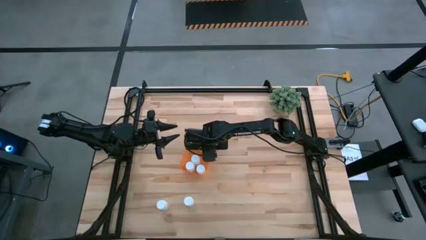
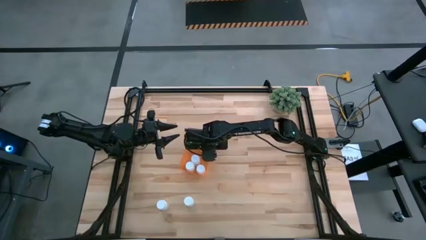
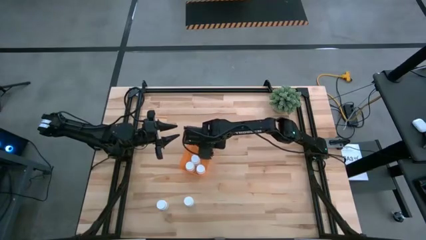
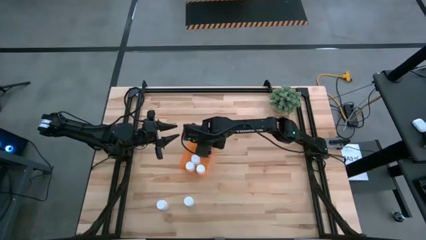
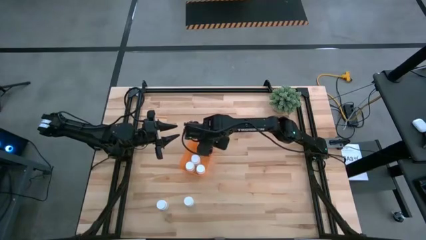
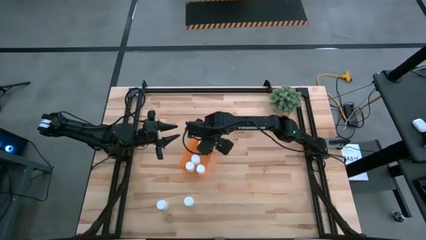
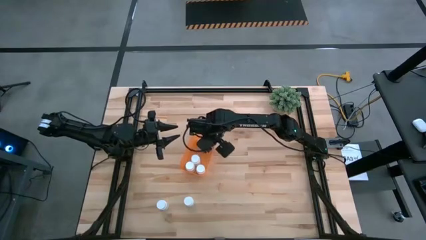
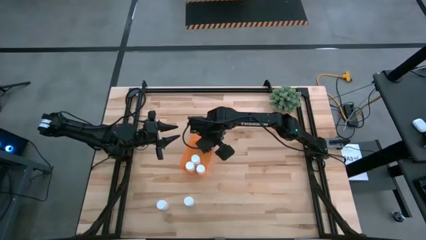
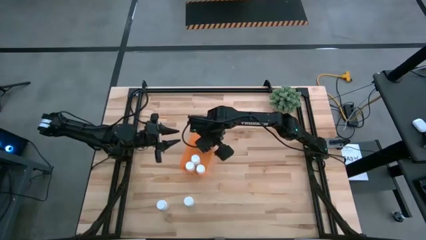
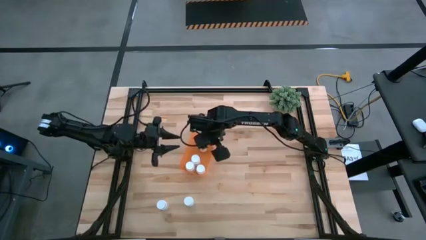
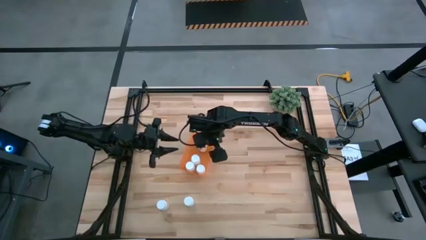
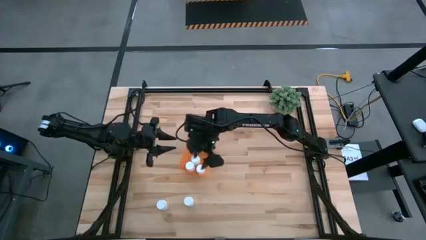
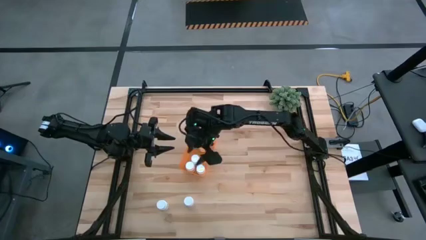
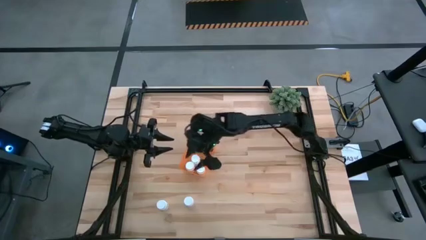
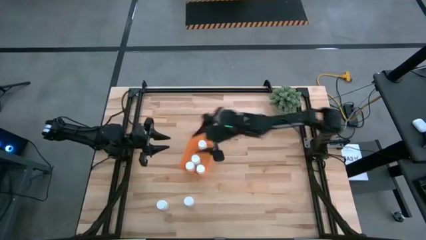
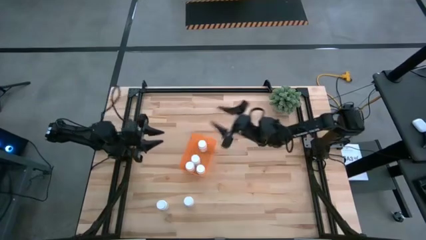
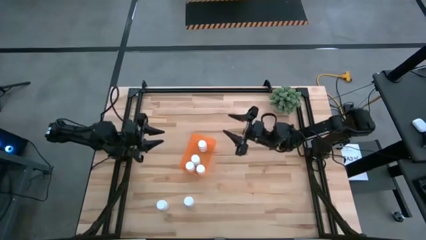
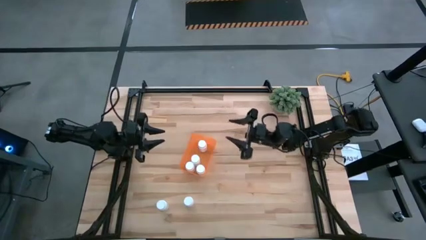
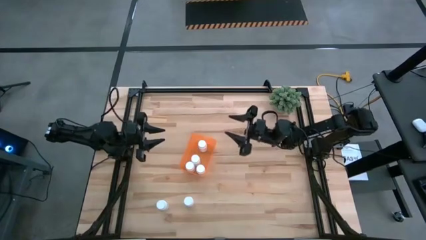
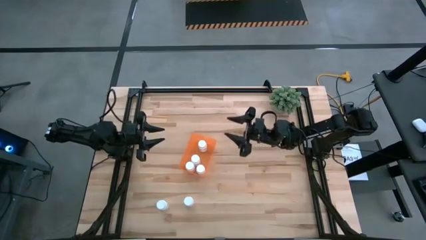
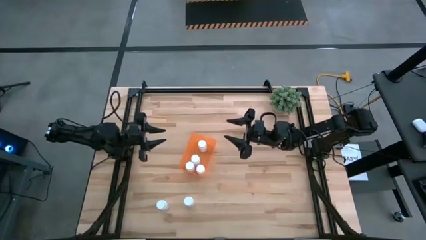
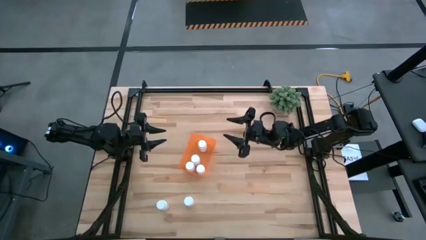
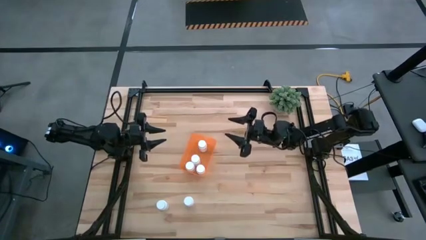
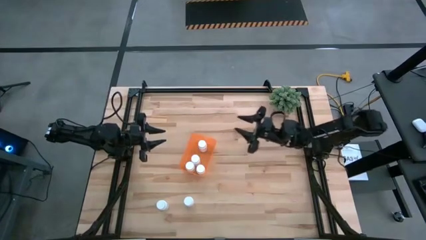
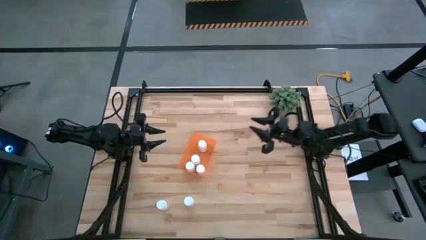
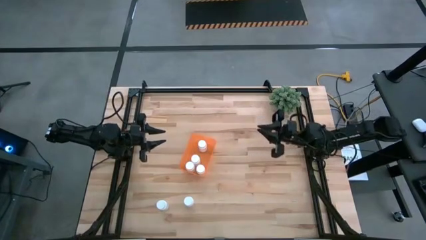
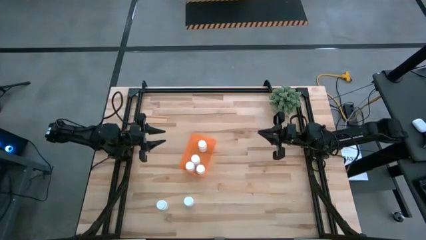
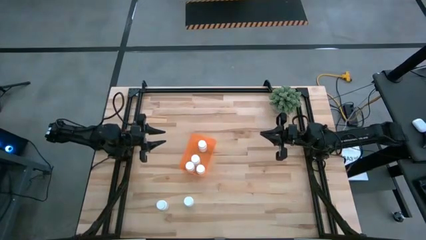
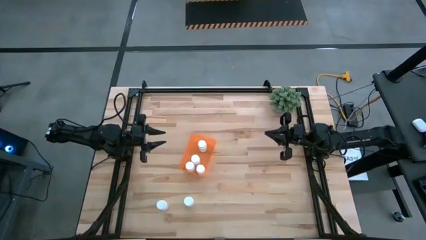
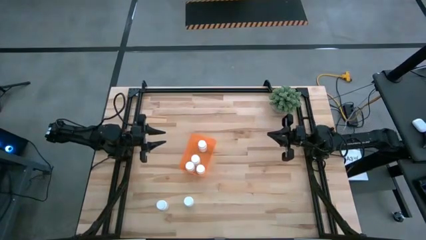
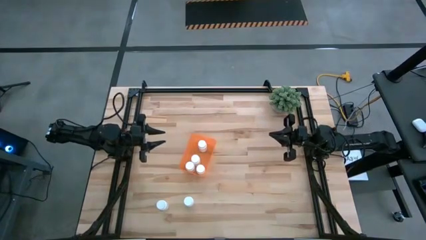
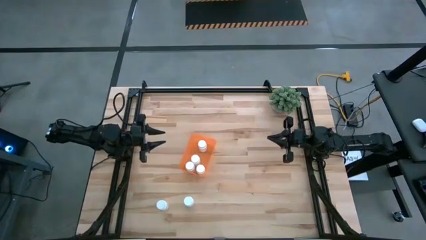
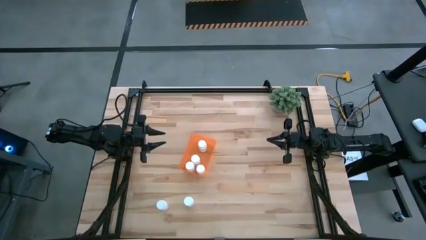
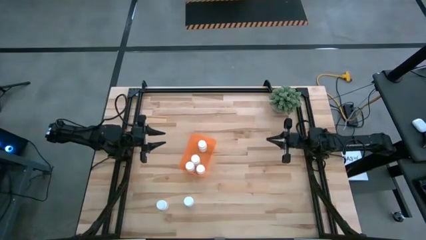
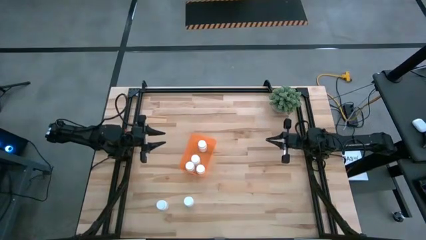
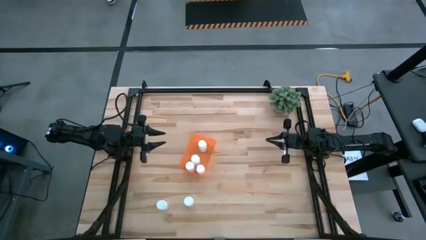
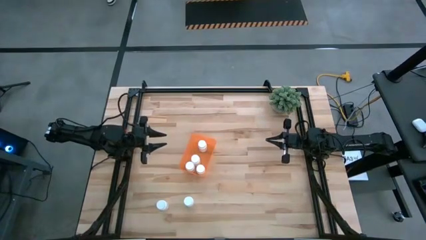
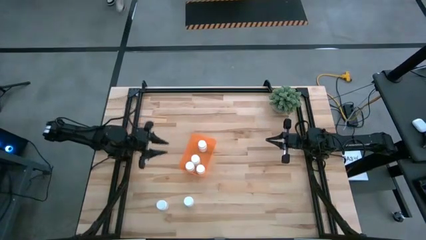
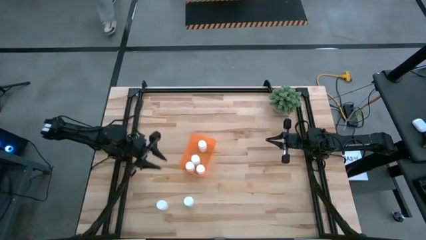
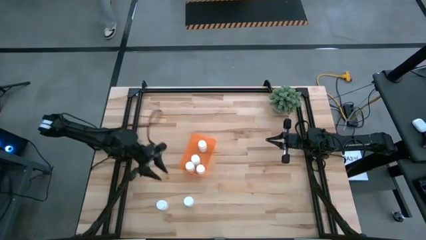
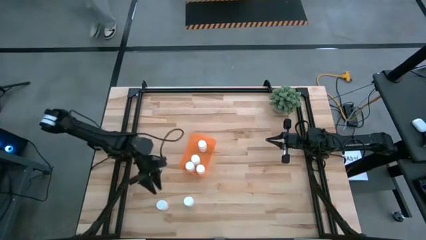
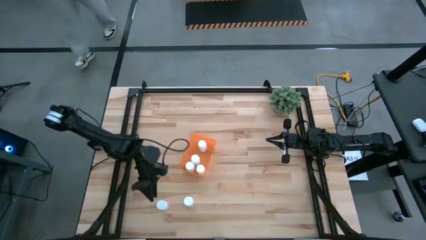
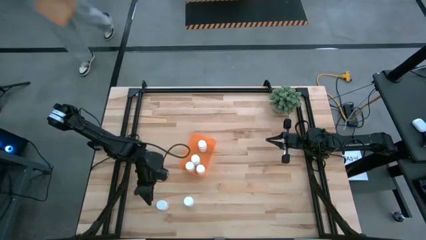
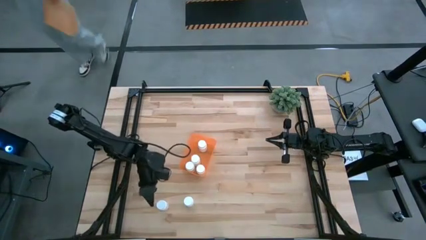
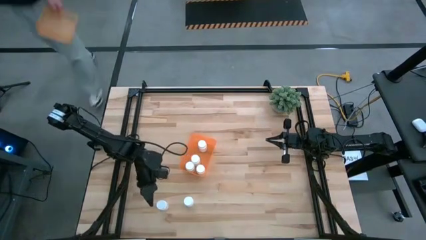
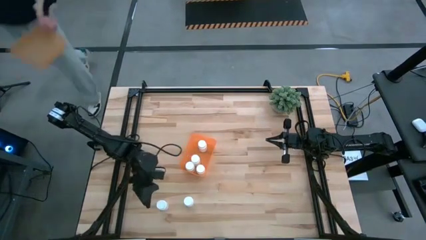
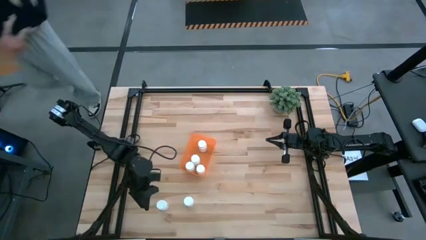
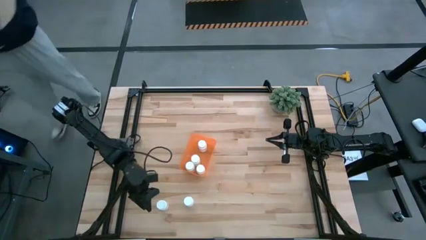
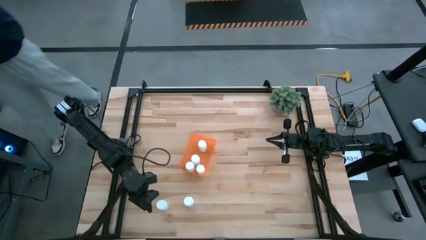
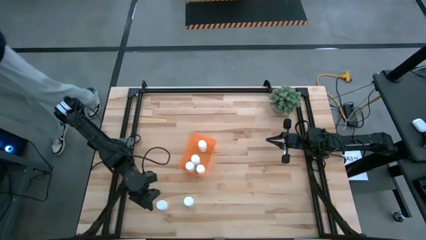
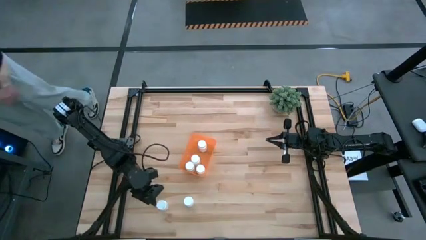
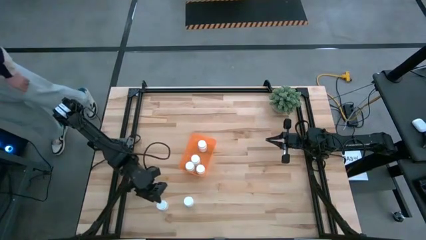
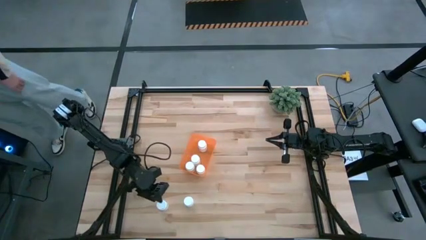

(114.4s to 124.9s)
Task: Pick and place pill bottles into a basket
Put the left white medicine bottle into the orange bin
